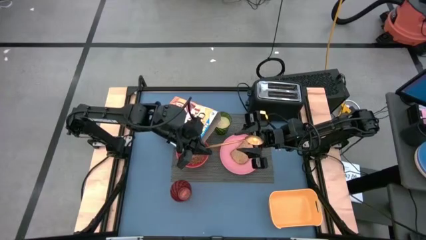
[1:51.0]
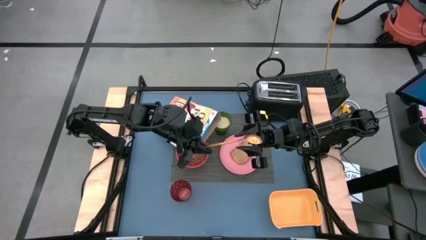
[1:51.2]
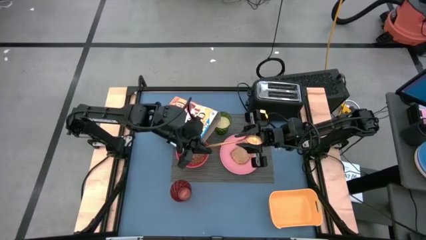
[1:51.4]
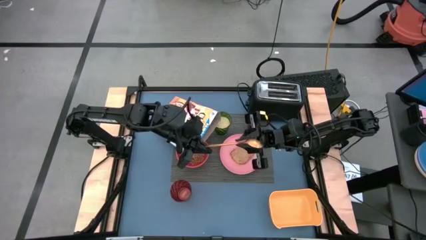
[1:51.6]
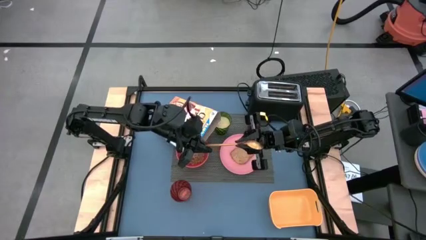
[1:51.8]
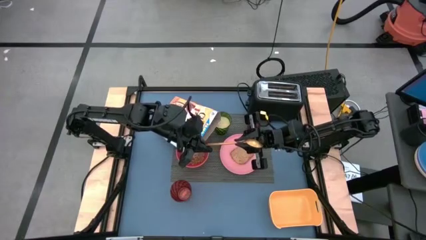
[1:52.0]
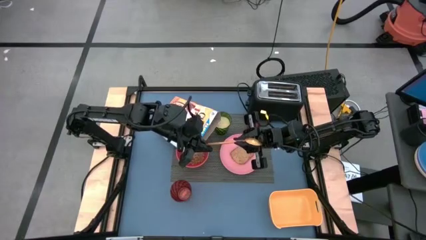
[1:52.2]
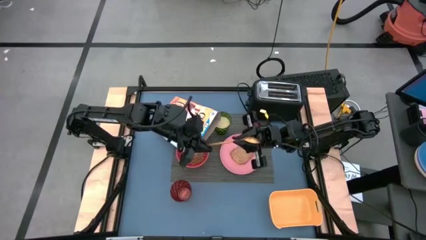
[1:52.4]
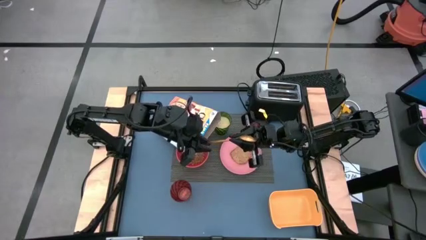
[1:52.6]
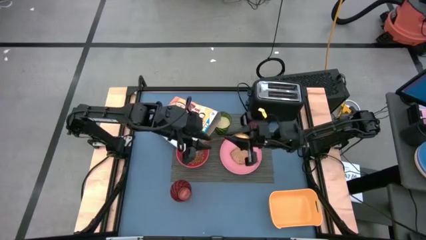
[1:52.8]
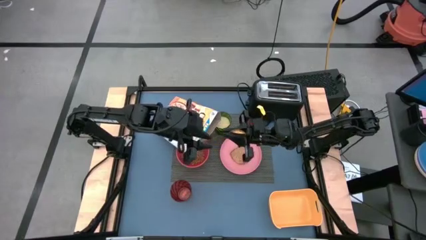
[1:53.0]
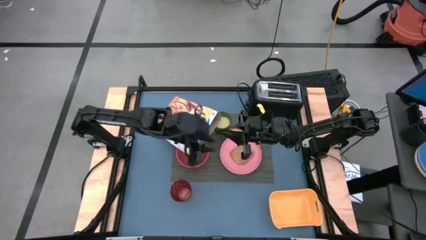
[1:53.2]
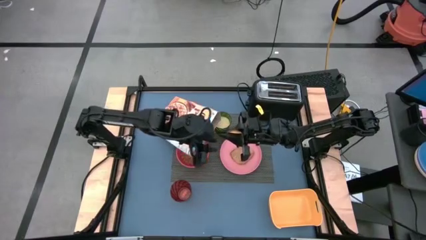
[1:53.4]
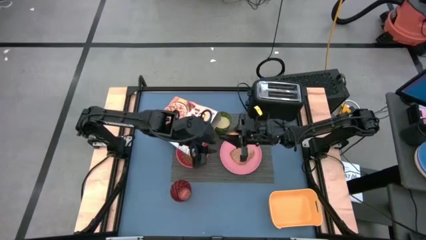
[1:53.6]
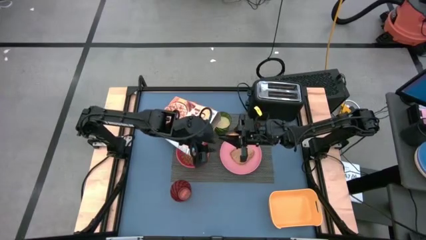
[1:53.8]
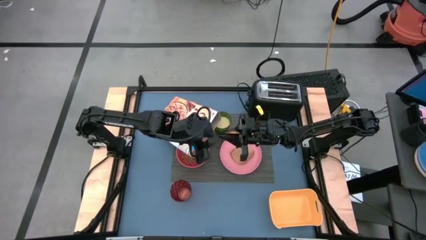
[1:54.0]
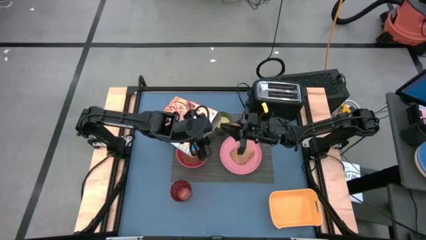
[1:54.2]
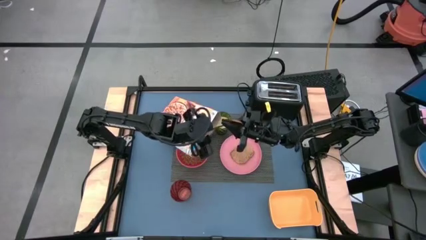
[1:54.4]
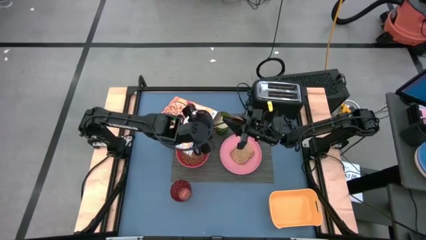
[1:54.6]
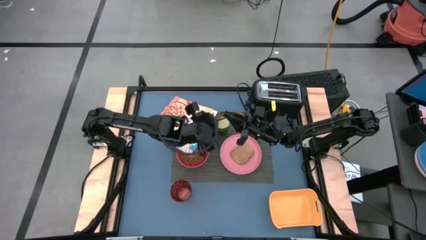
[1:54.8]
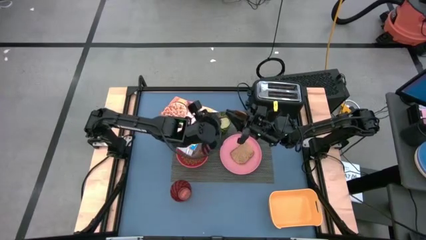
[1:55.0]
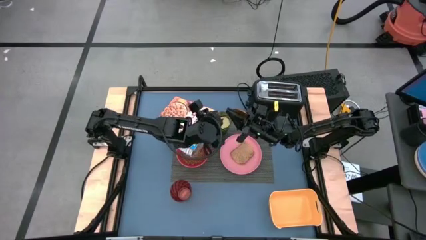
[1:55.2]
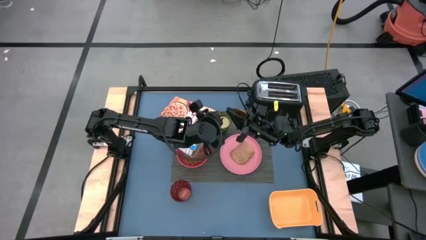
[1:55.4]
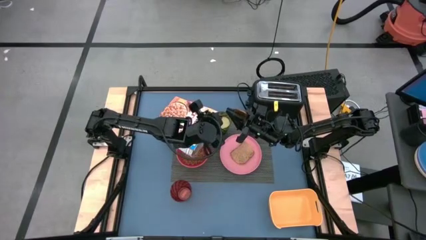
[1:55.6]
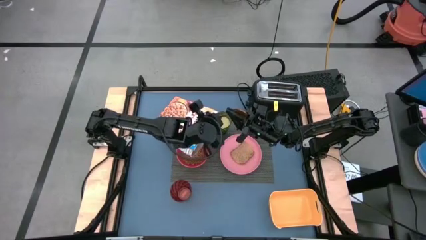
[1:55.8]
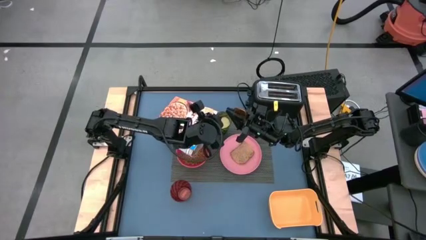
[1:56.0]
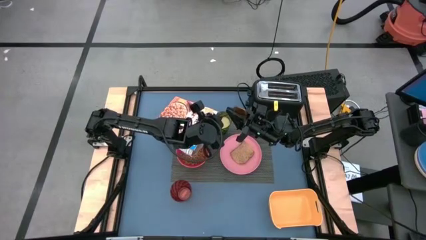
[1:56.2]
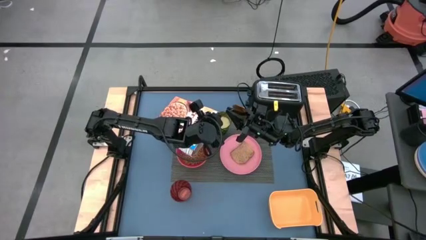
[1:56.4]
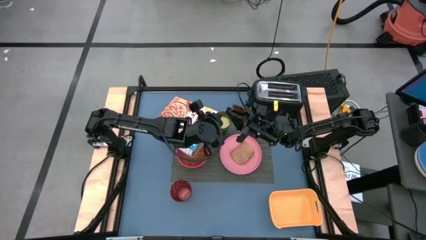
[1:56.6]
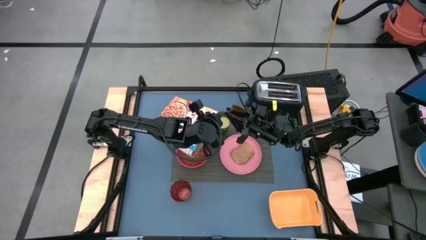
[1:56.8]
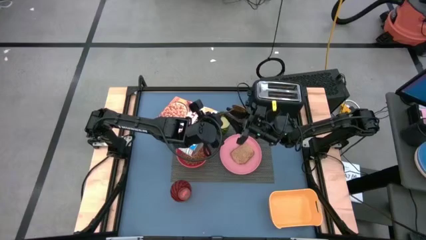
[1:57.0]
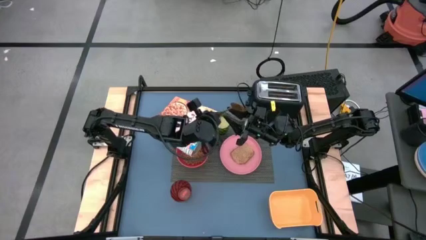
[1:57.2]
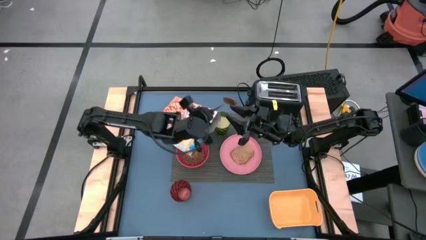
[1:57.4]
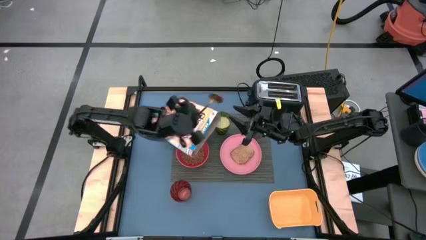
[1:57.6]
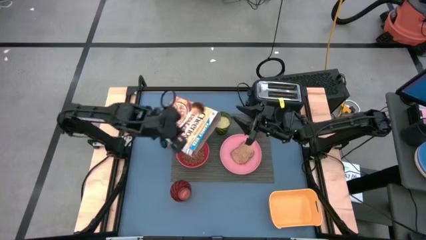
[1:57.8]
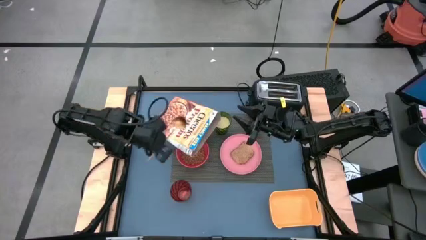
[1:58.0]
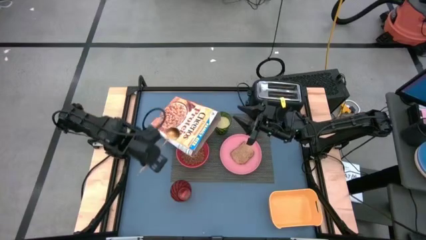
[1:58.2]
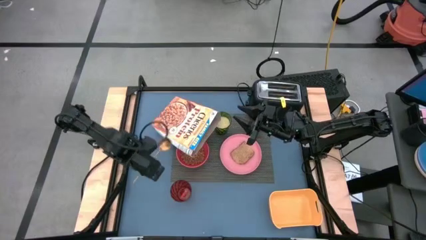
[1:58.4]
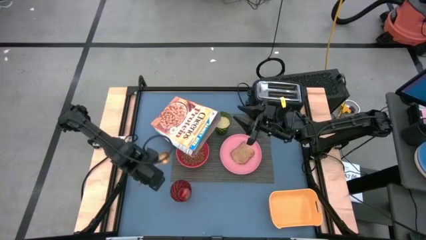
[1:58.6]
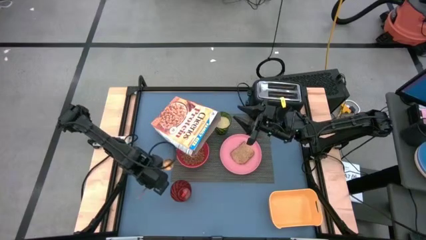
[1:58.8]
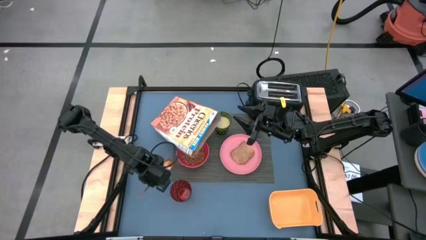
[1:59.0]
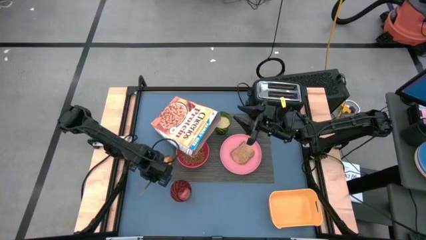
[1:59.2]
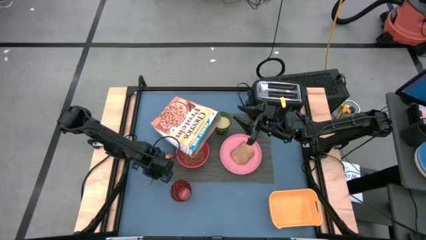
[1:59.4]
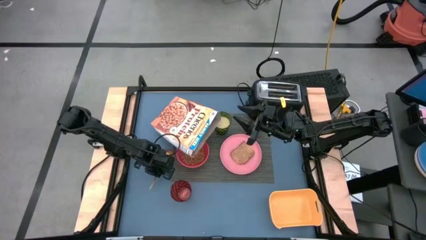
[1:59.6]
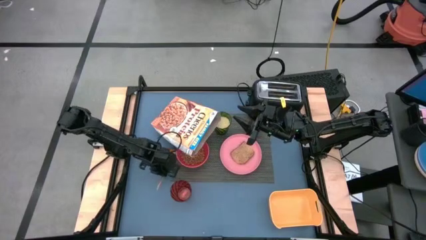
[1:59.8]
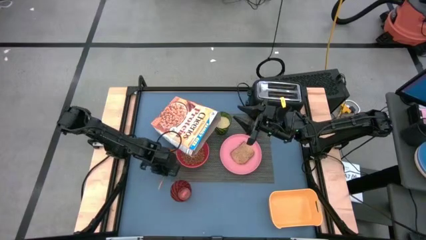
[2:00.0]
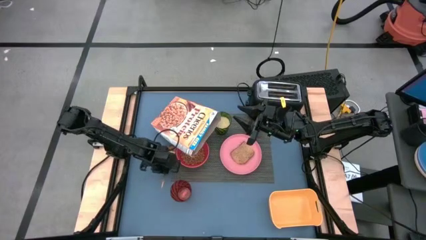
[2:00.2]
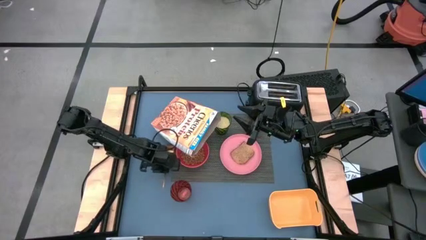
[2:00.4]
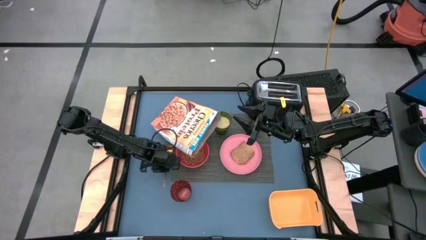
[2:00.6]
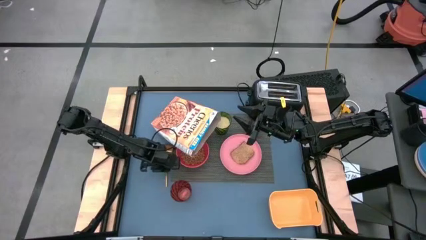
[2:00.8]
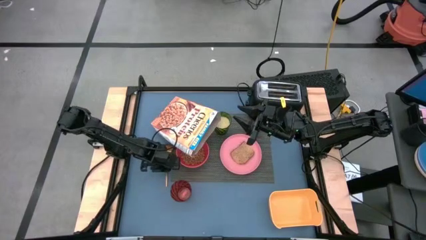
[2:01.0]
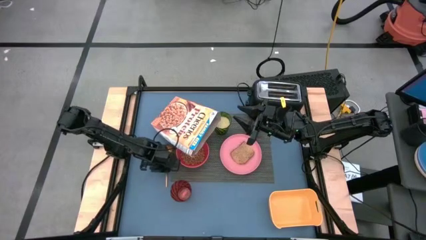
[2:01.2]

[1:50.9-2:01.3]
Task: Arrange a breakfast setting
Put the spoon on the left side of the placemat

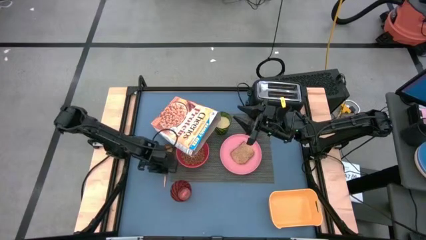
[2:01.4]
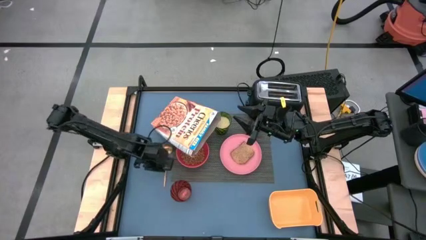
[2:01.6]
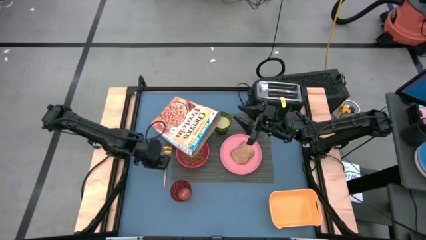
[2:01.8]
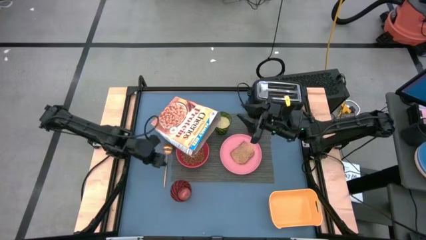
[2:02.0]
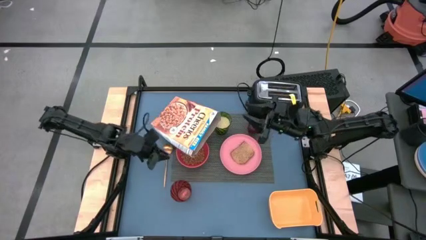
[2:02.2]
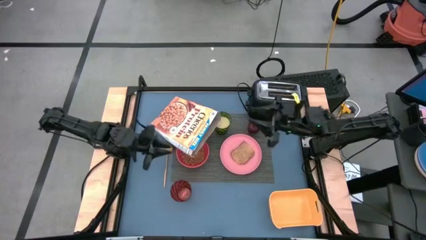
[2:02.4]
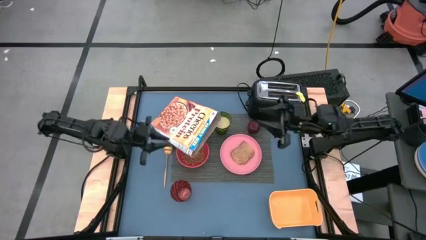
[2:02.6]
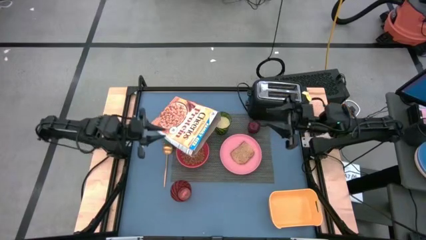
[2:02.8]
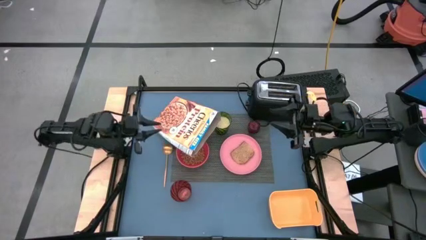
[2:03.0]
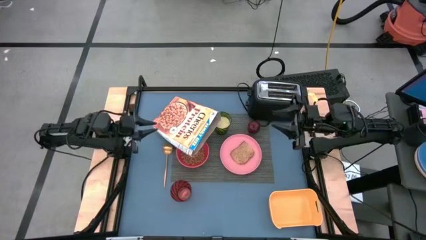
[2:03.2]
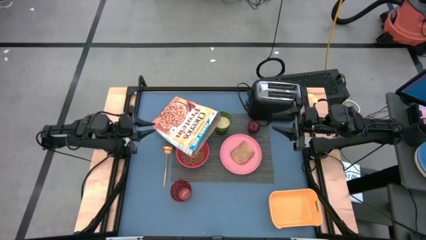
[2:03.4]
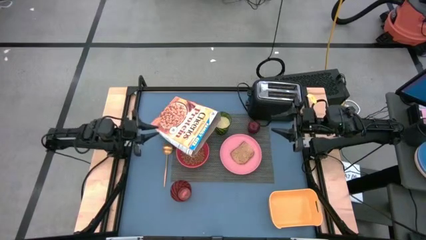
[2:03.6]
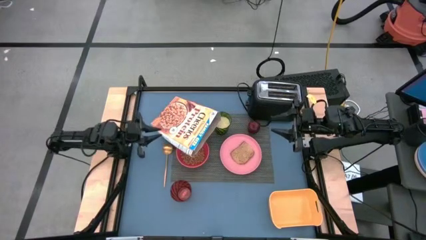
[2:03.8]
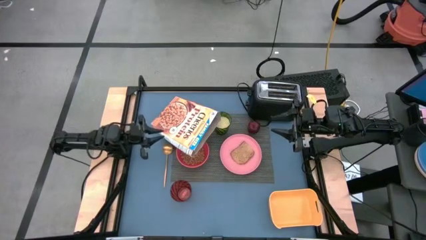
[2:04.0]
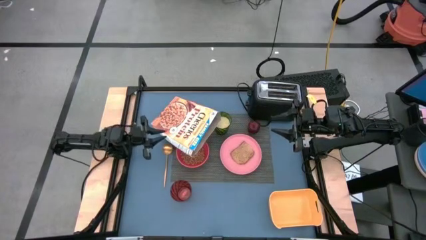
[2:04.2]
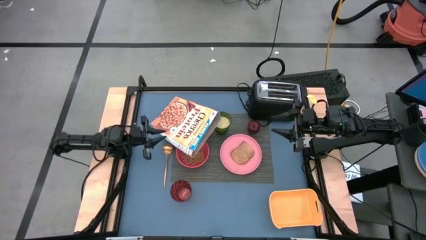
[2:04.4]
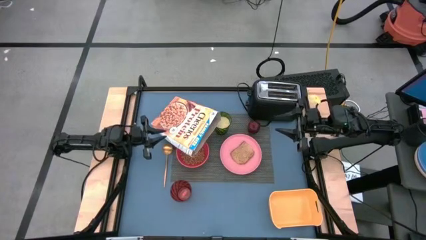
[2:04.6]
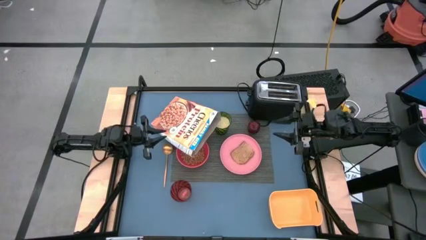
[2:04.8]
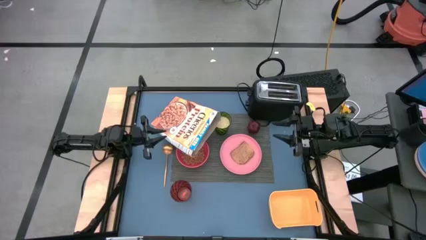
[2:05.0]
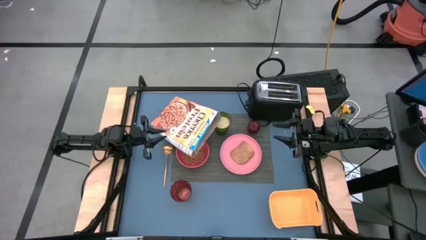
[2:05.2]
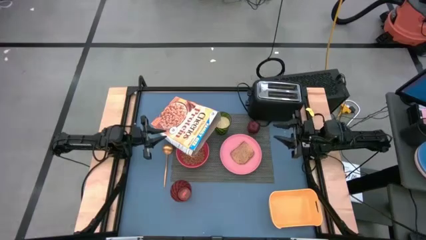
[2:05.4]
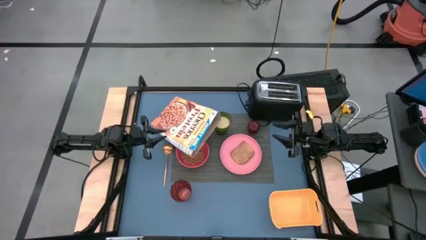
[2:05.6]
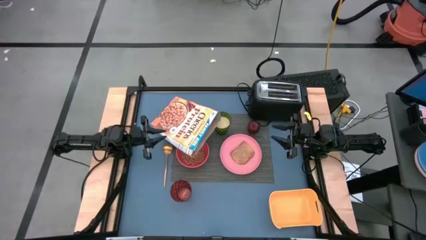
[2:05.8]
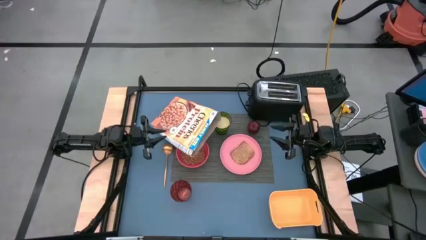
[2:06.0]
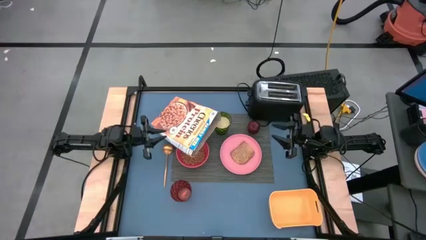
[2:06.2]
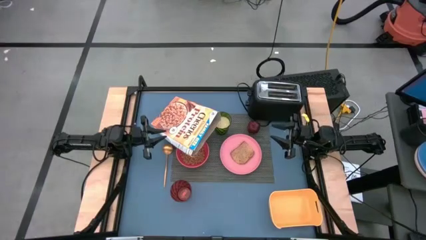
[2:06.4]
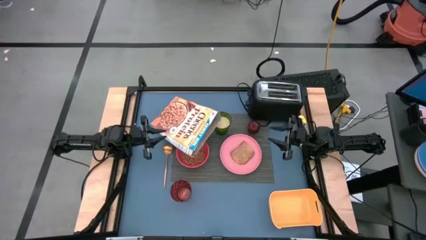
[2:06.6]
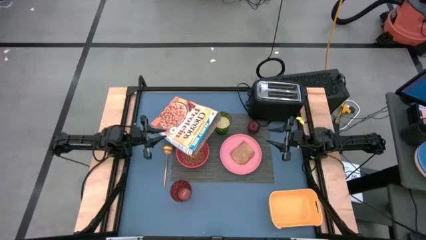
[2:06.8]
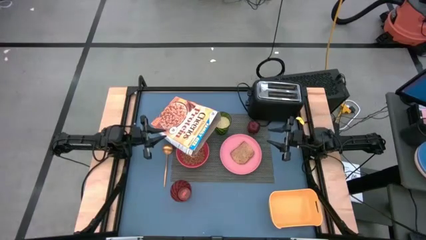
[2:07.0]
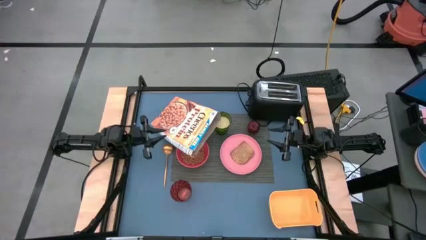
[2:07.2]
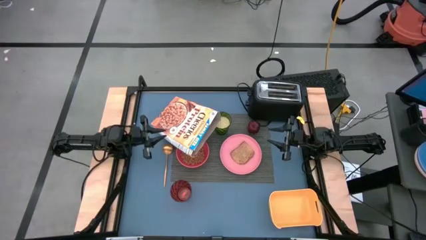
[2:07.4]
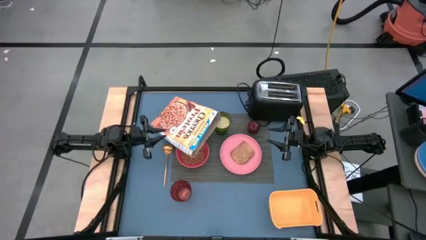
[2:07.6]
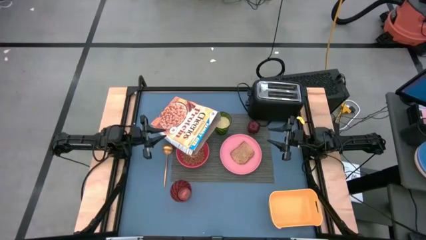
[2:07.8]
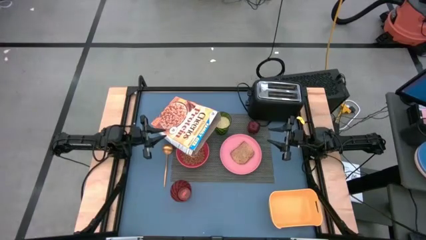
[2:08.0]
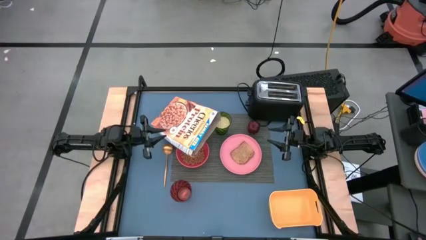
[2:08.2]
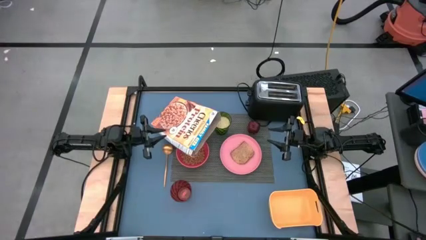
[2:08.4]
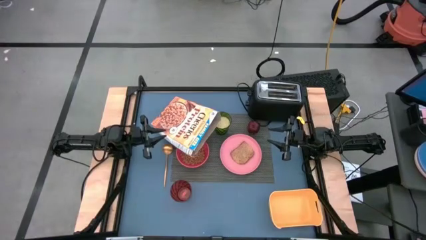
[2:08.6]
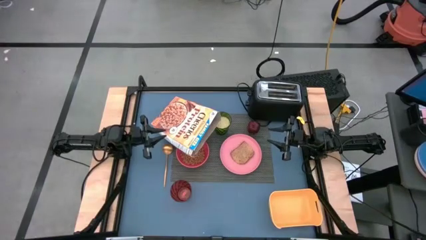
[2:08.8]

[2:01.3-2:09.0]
Return to Home Position
